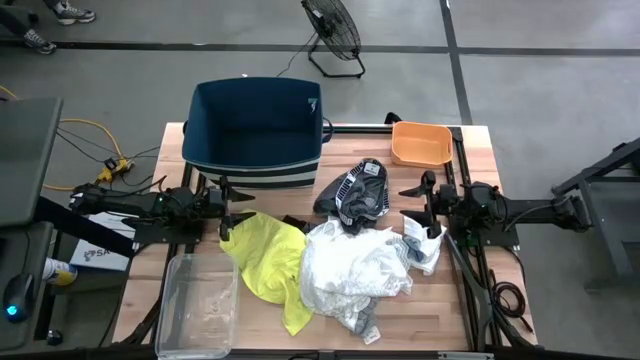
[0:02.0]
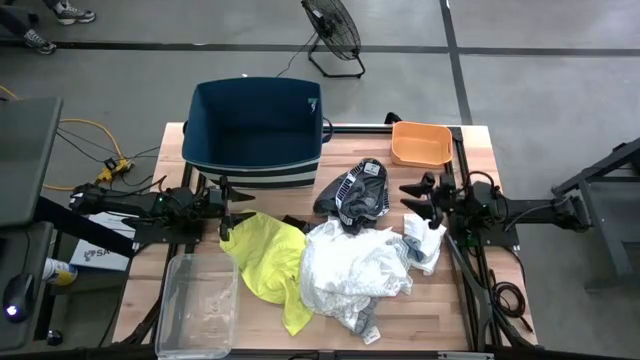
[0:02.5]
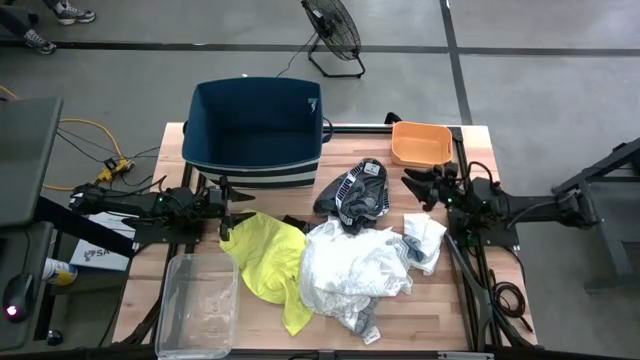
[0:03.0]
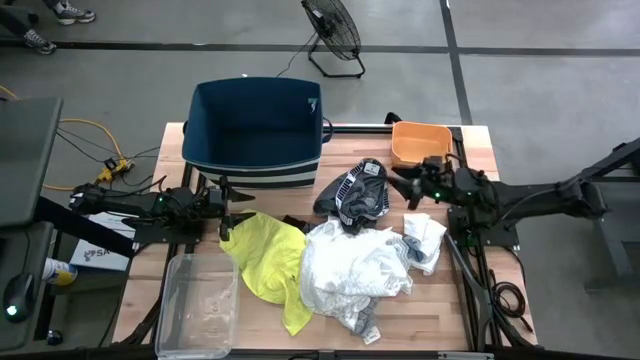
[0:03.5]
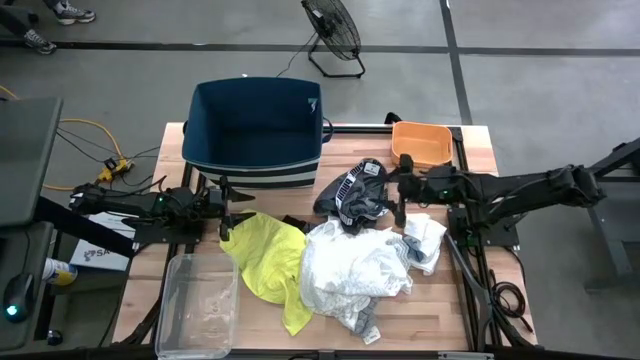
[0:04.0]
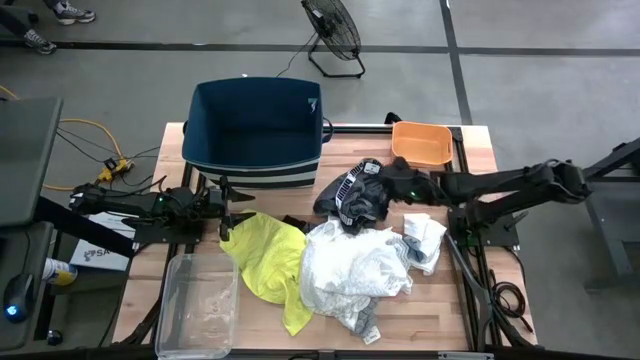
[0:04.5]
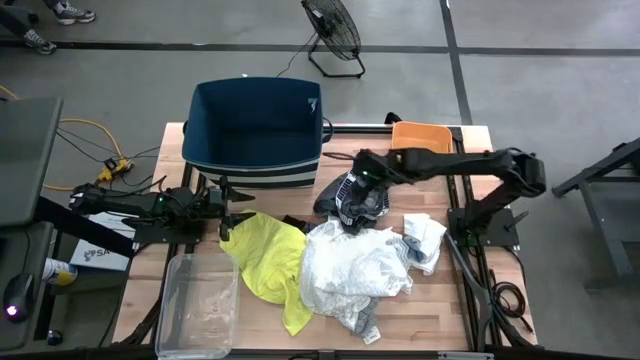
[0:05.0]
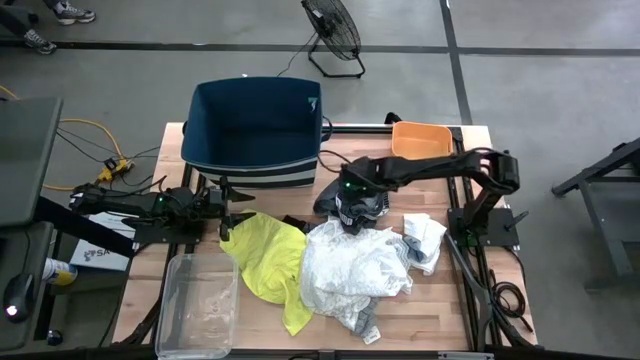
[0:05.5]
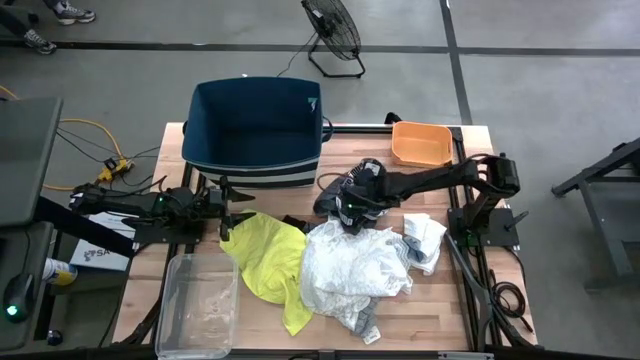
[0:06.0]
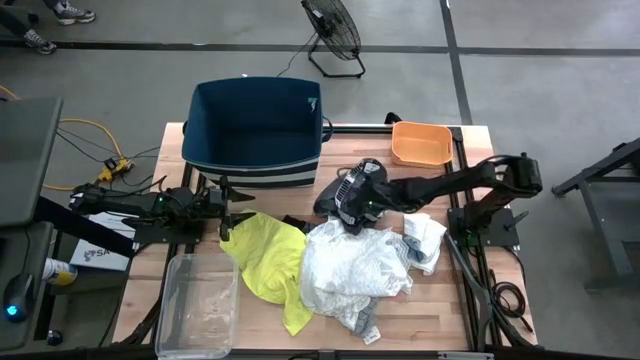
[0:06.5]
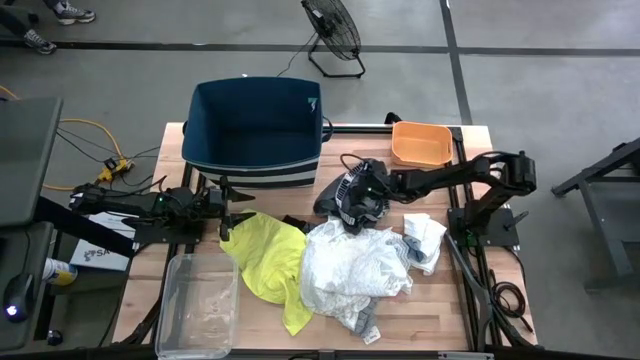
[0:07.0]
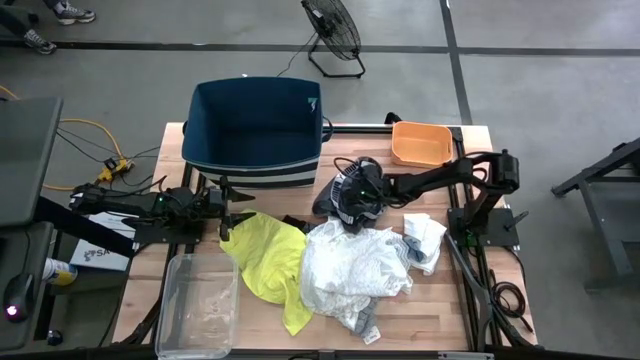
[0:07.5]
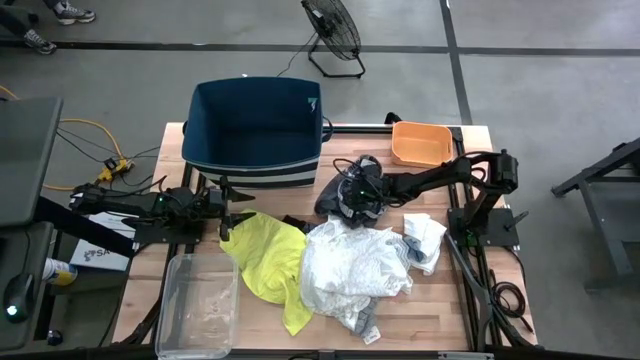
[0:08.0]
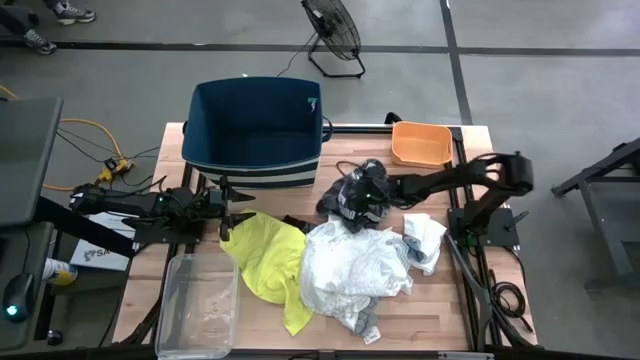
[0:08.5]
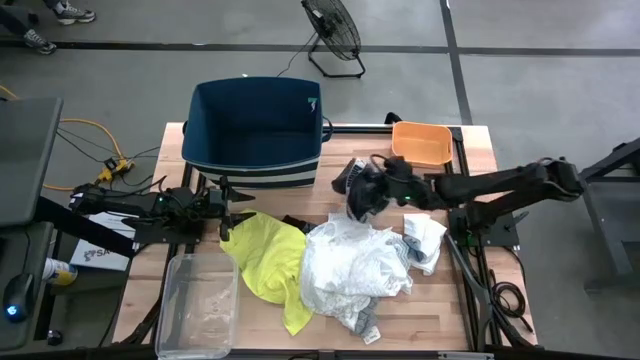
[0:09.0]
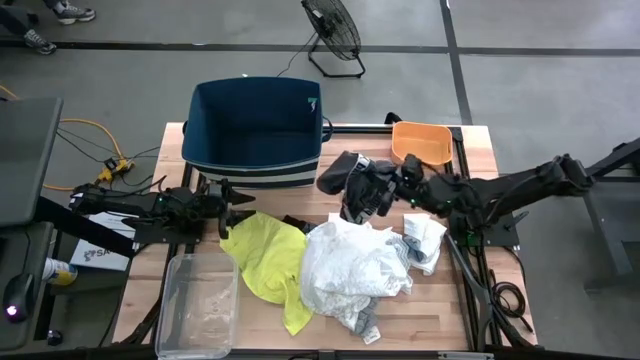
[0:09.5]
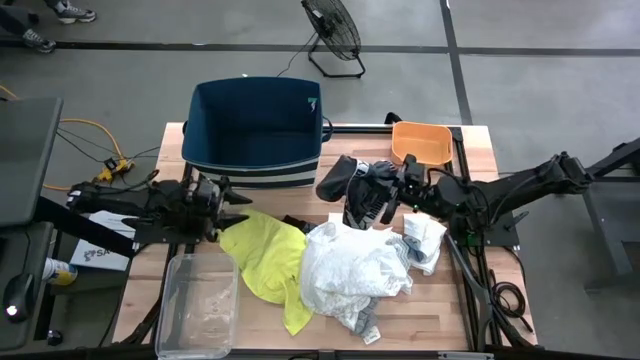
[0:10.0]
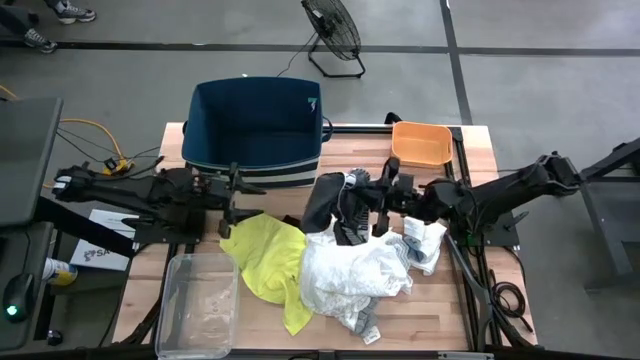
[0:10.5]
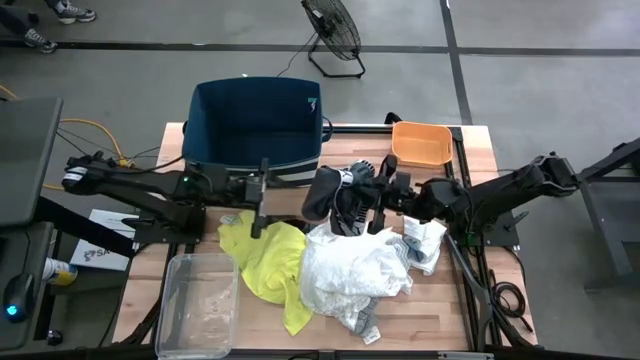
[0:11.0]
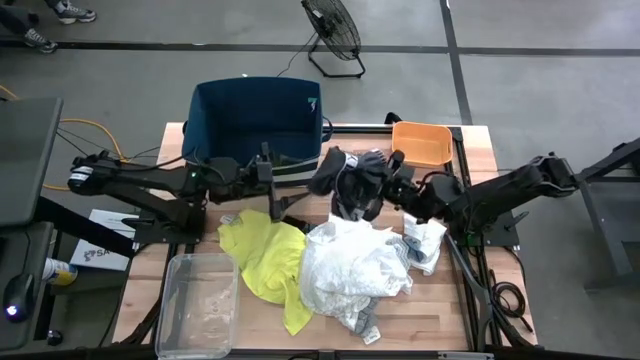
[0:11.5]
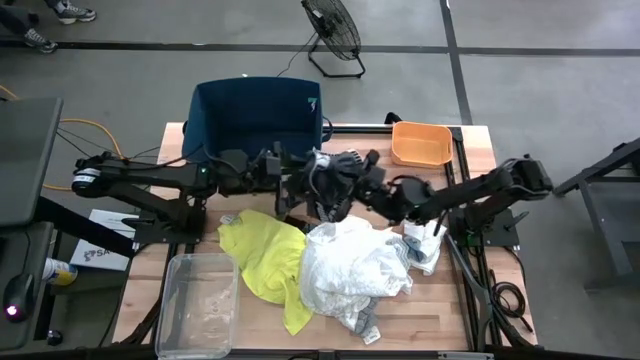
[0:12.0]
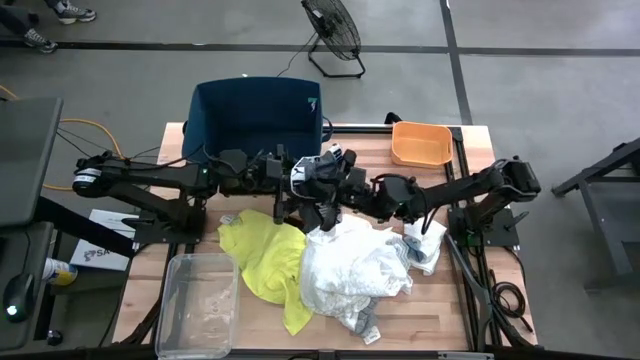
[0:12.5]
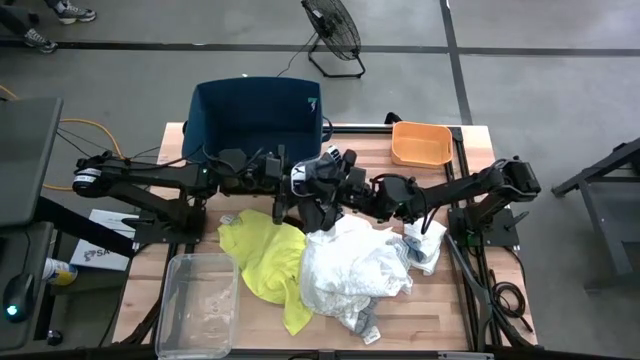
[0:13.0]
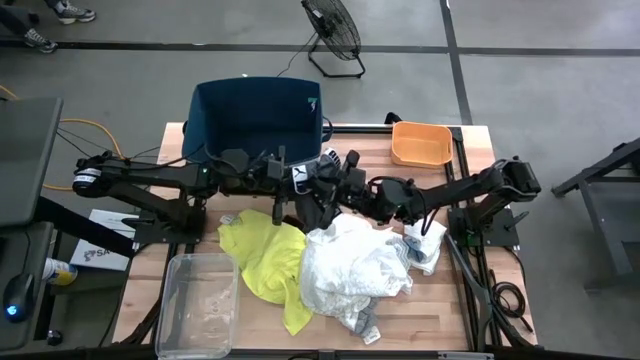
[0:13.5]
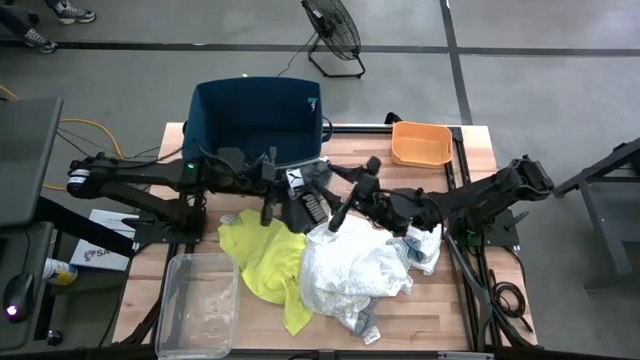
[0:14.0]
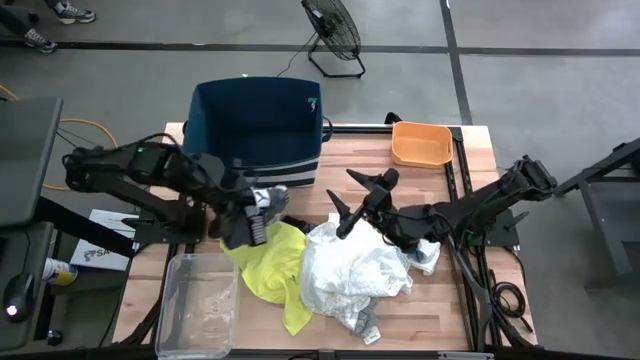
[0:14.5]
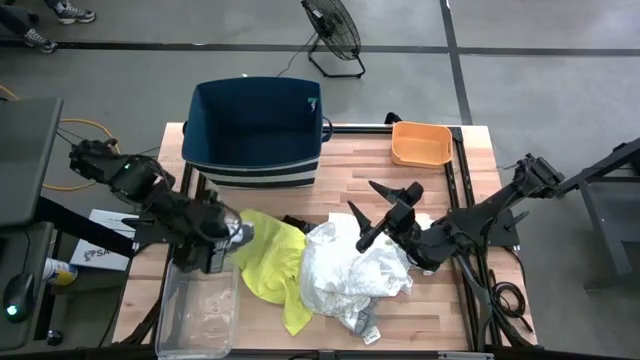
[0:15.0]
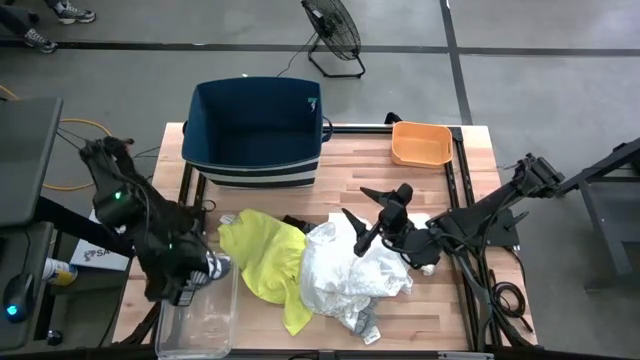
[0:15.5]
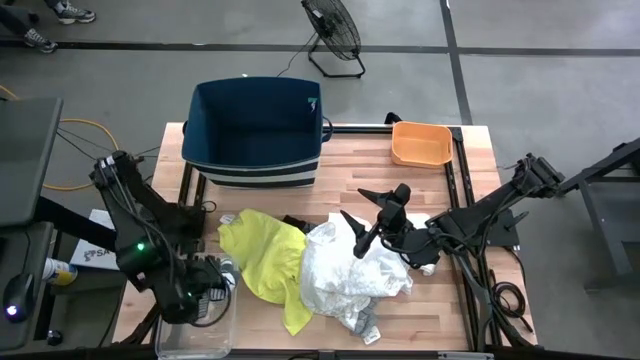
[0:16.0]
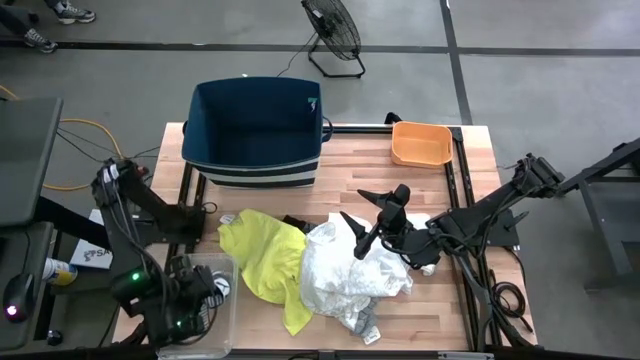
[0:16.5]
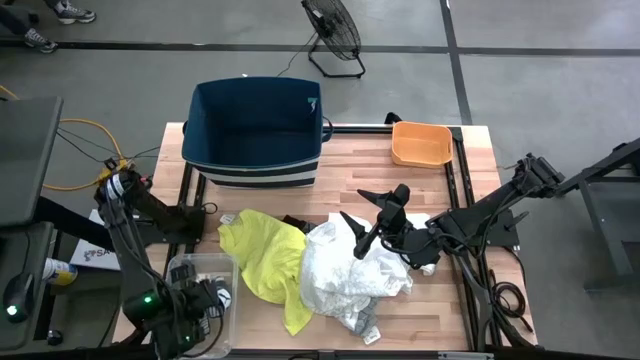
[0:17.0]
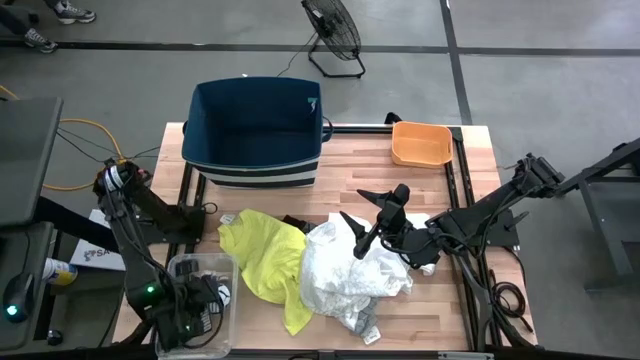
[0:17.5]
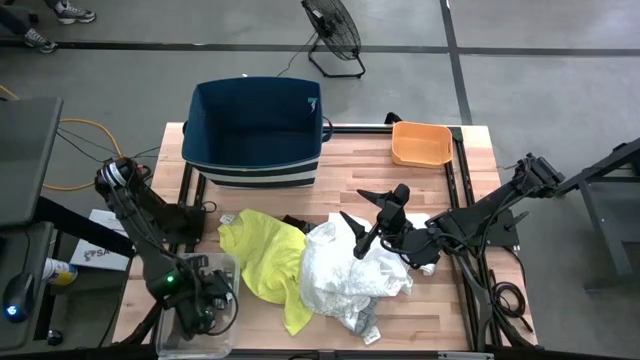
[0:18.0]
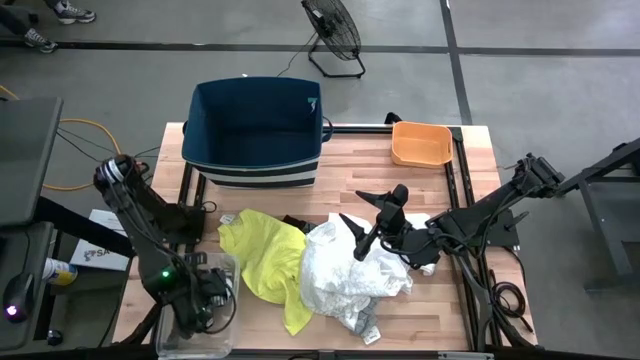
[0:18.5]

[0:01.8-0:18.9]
Task: Pick & Place Cloths
Put the gray underwear into the transparent bin

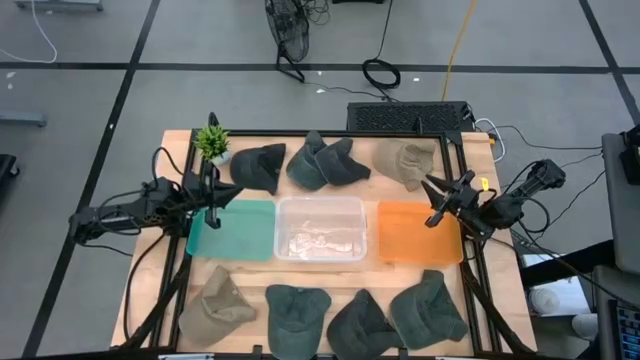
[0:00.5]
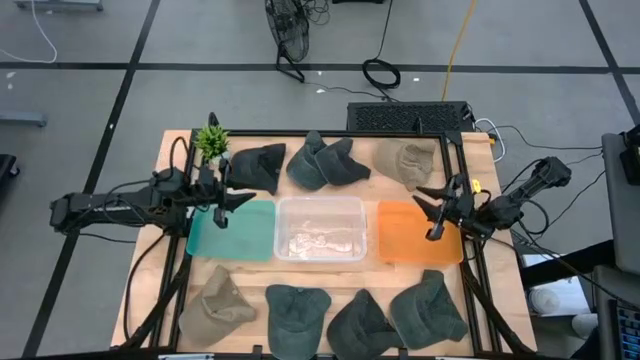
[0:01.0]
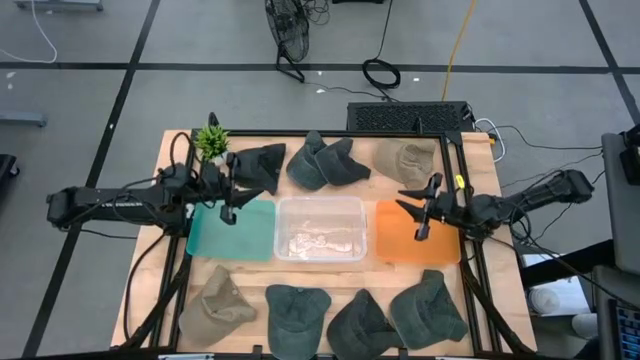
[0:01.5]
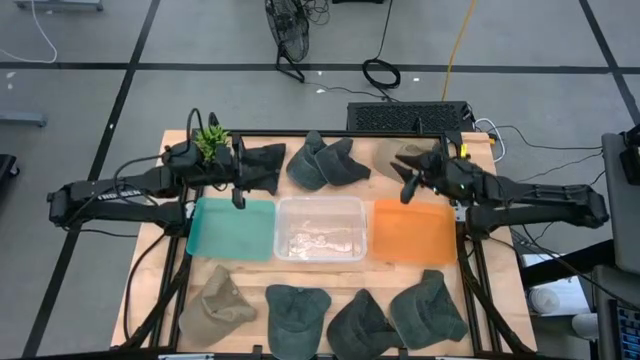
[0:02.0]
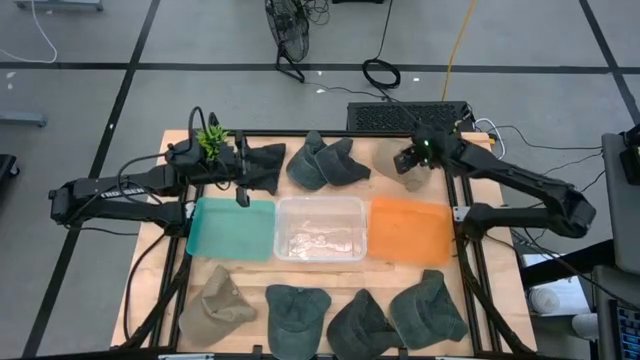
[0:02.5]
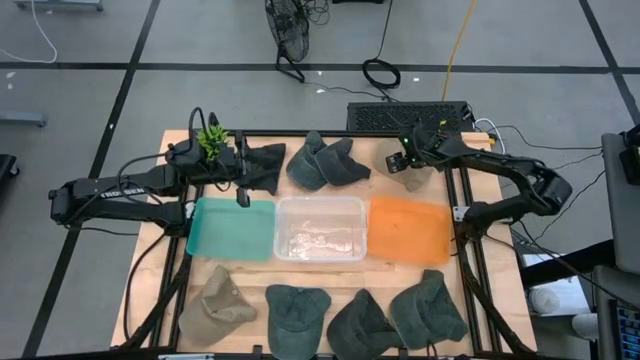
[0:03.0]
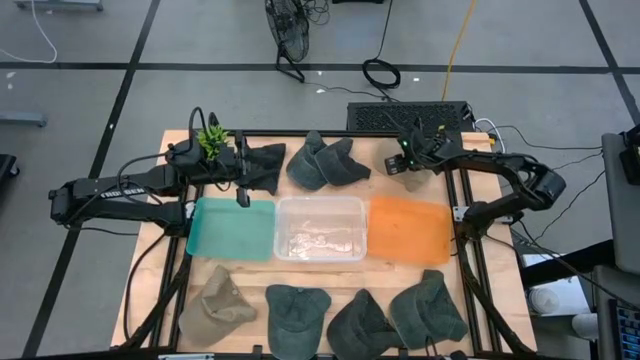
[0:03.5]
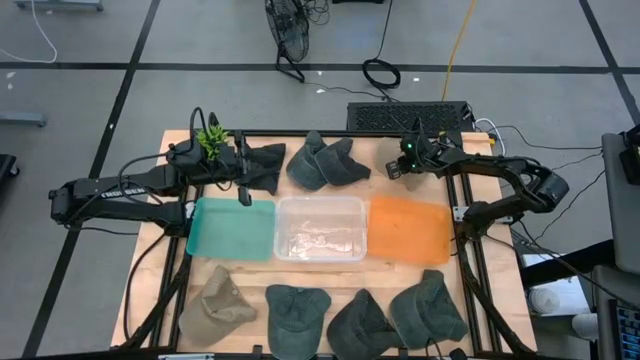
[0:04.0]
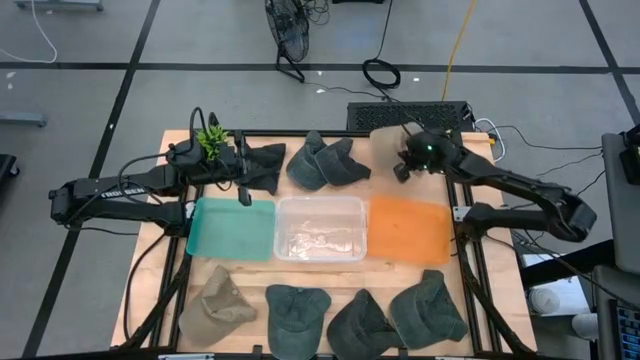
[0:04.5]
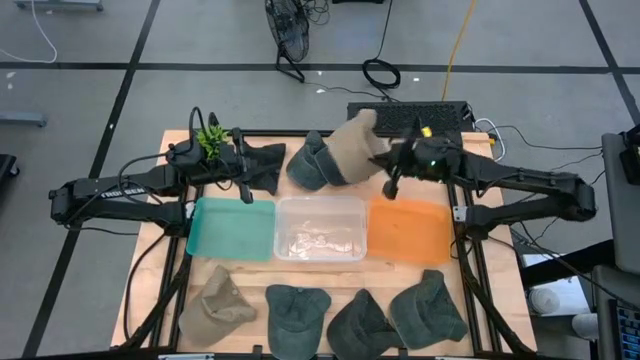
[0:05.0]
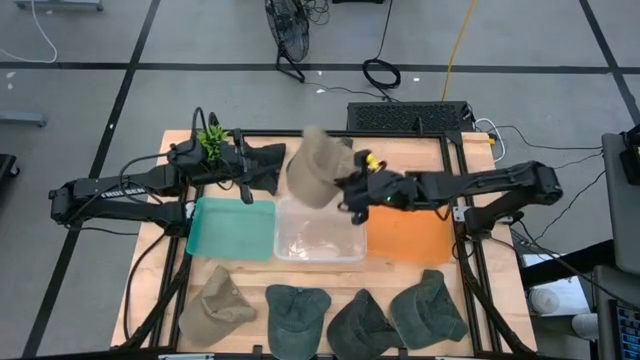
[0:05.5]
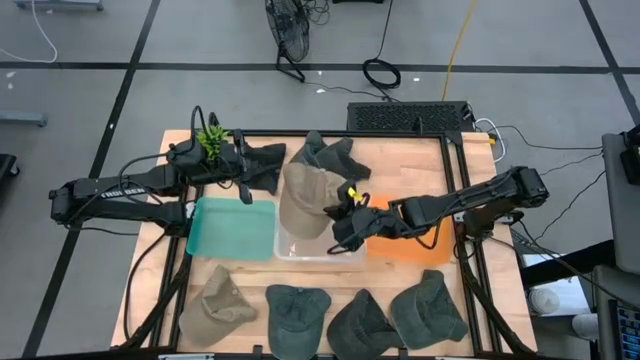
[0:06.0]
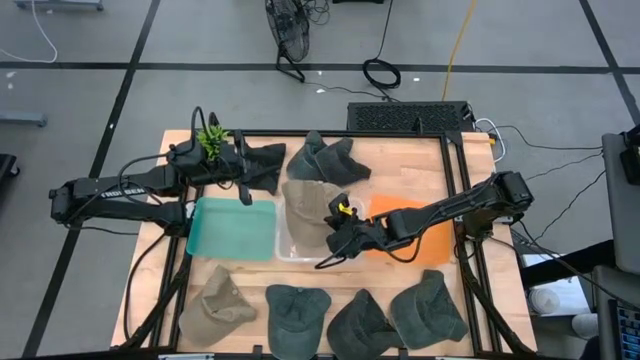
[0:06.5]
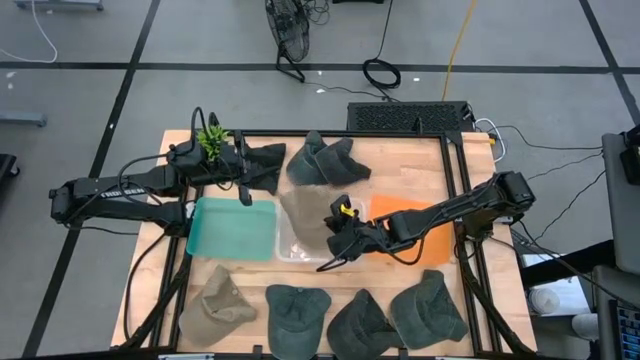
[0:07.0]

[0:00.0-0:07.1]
Task: Pick & Place hat
Put the top brown cap into the transparent bin
